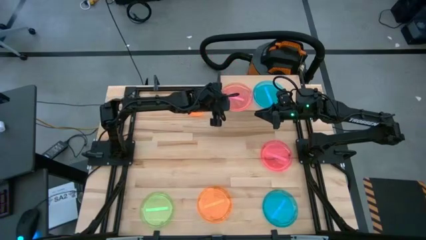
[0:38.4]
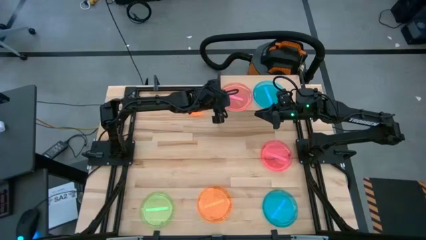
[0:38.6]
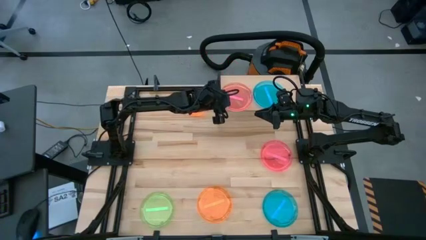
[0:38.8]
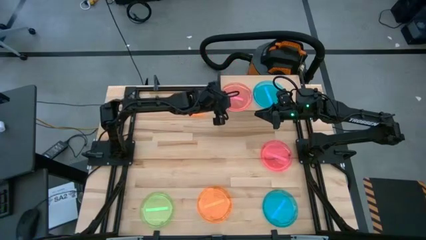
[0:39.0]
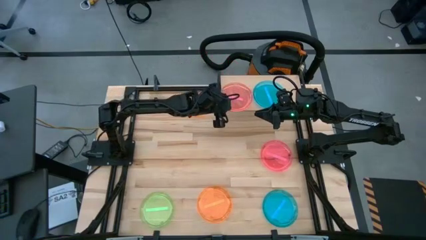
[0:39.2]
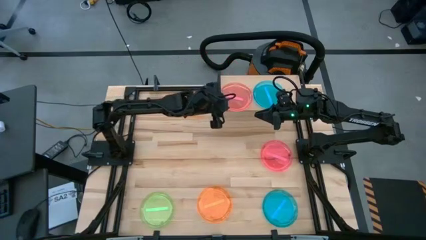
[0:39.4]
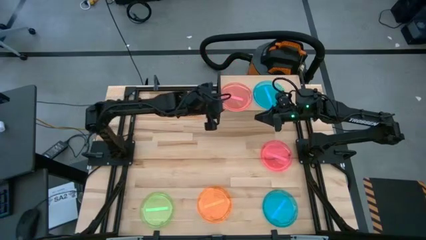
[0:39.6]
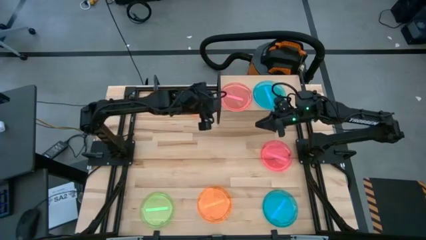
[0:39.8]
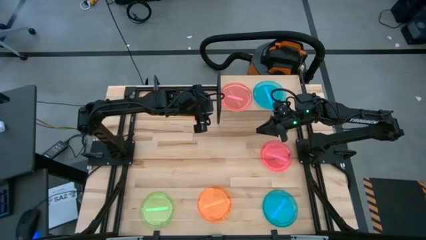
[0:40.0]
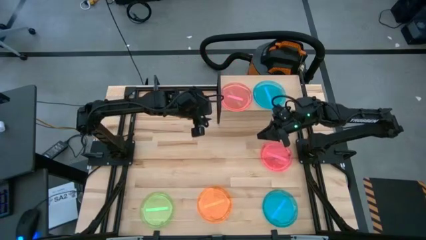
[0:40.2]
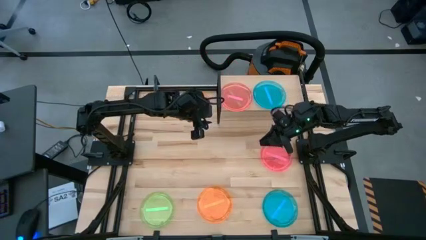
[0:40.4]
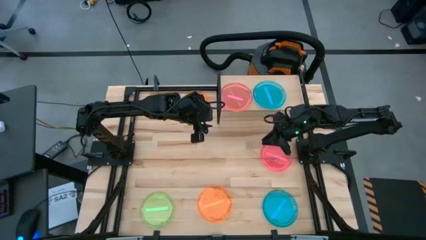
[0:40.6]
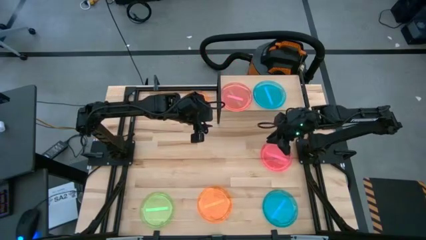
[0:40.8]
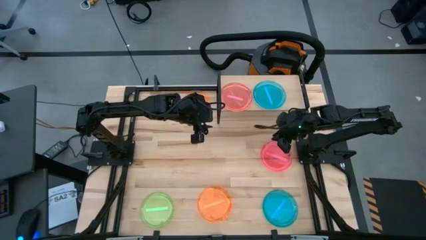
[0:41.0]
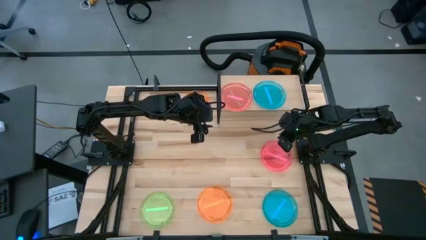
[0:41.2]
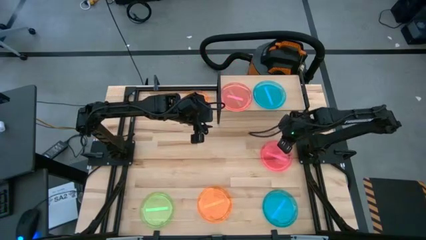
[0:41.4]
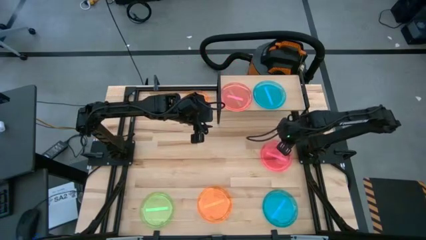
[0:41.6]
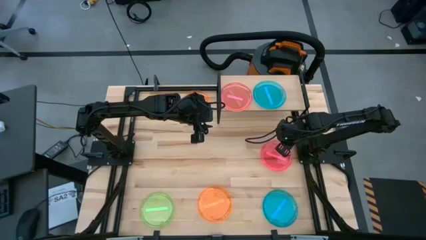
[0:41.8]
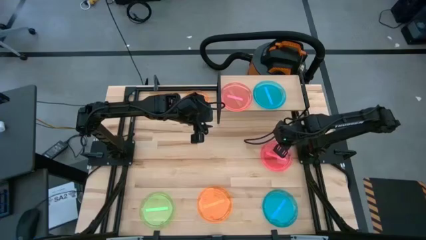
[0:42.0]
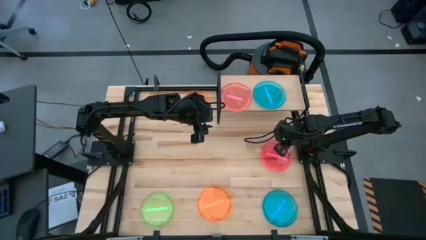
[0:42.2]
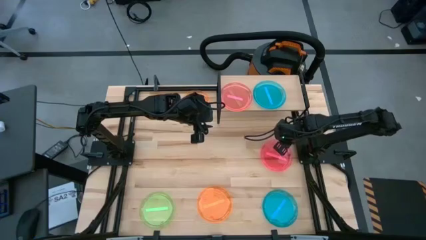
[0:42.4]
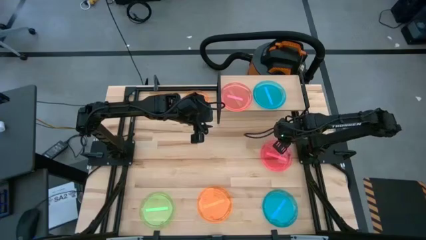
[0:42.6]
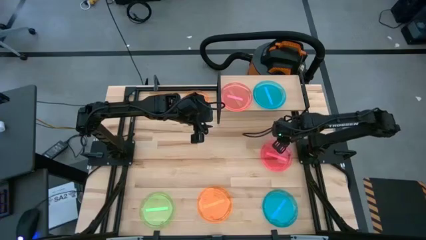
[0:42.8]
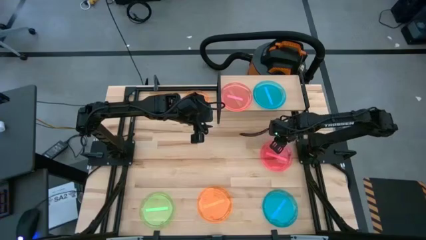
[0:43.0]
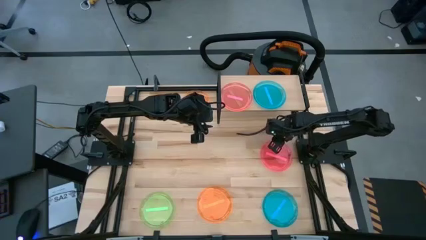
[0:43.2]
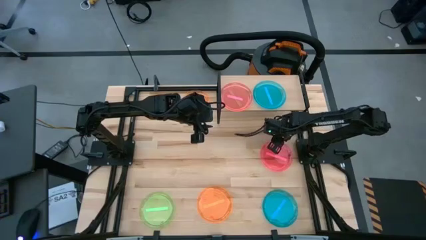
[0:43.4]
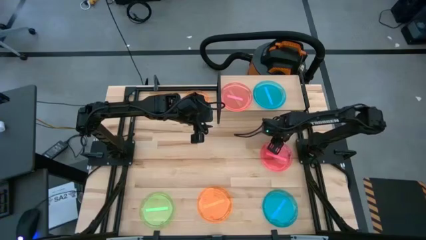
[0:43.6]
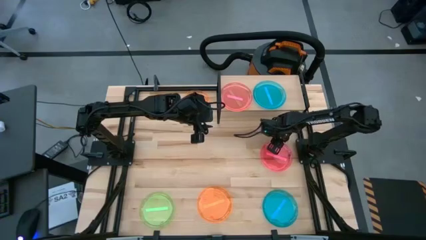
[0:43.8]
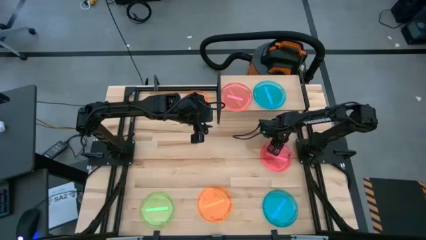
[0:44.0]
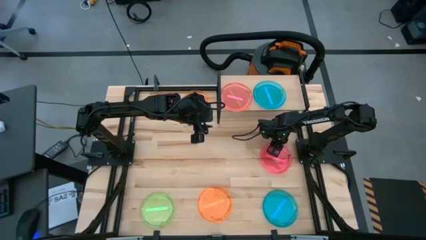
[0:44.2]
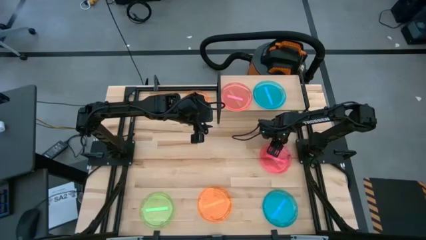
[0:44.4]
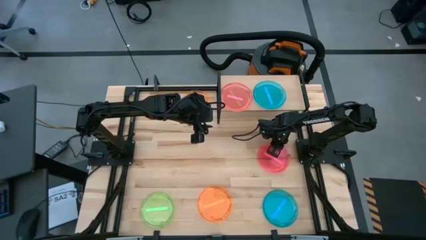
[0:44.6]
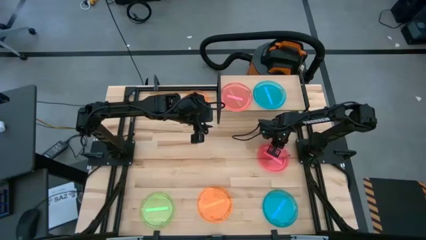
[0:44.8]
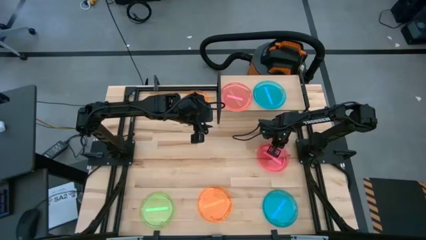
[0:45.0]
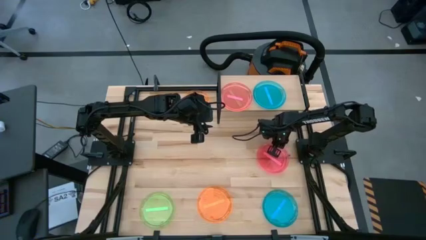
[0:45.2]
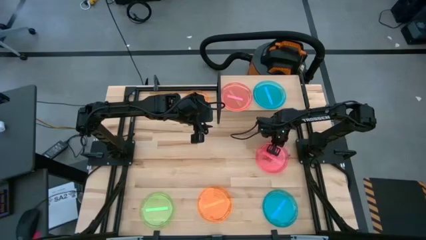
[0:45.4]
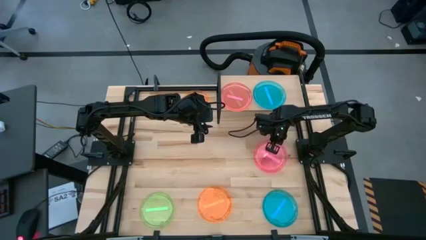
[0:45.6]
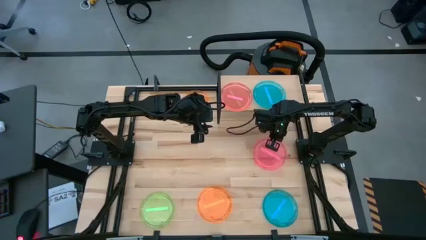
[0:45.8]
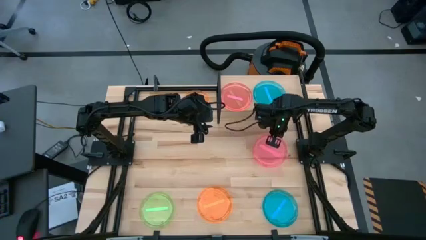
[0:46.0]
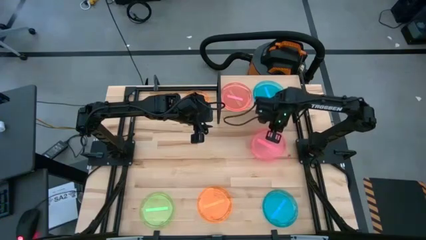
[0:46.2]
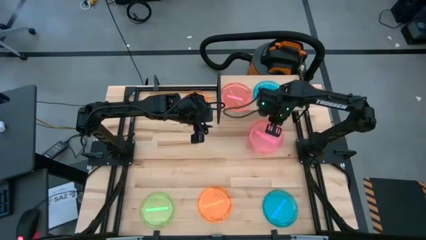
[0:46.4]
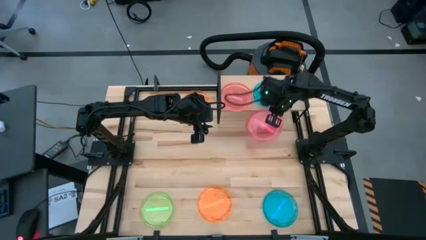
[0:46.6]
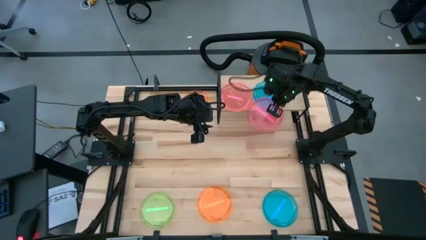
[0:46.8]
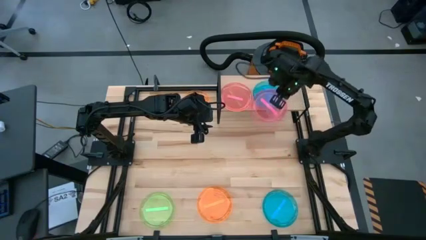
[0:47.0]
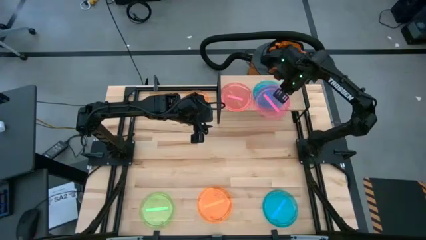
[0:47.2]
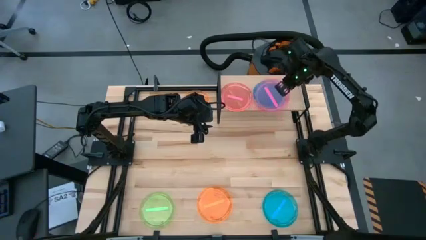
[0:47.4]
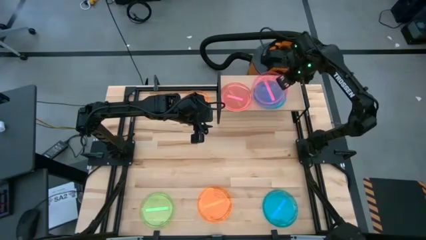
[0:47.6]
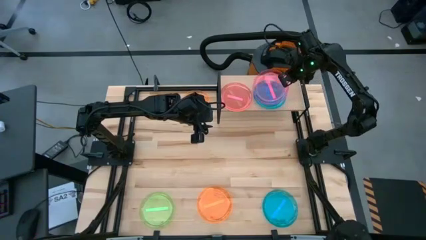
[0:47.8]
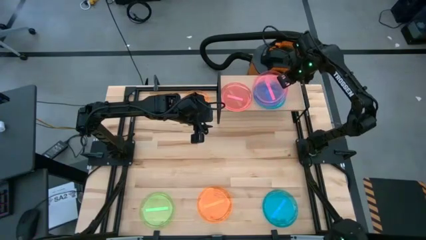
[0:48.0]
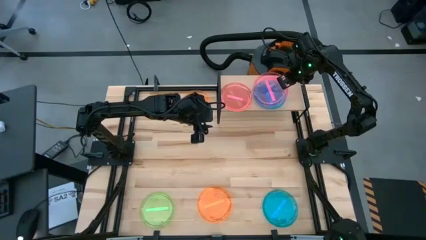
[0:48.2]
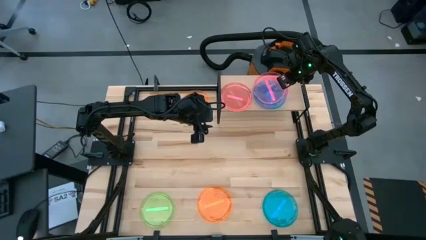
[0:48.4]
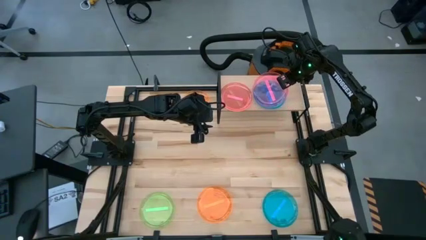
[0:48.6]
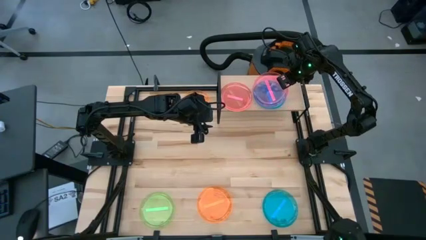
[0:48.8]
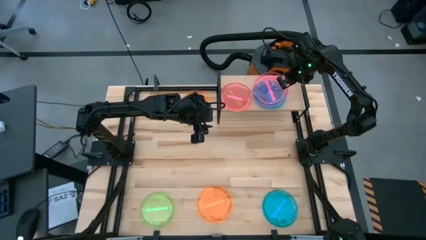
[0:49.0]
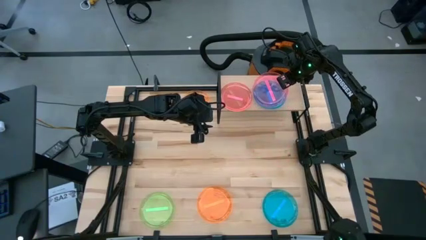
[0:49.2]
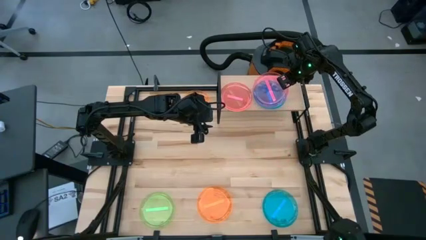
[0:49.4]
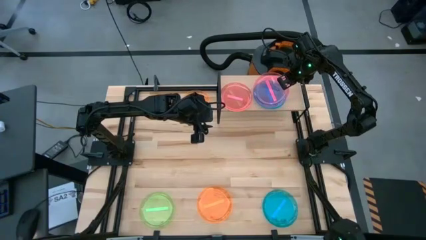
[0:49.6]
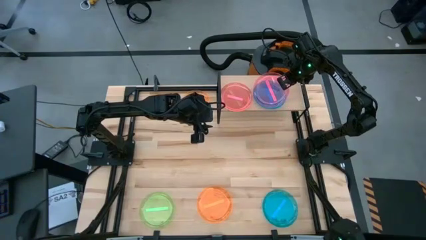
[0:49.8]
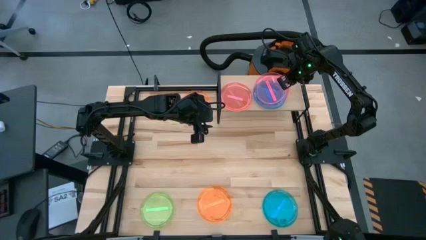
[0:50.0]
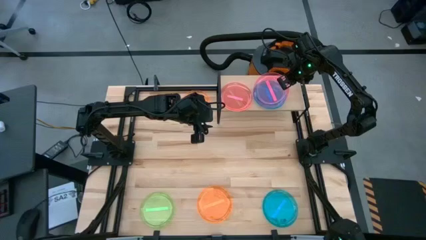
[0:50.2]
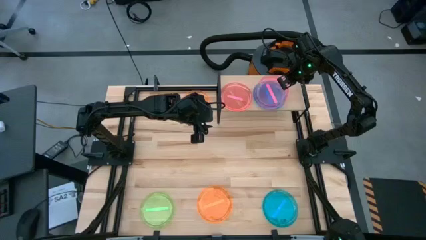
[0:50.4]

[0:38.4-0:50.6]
Task: Place and stack plates onto a shelf
Stack the pink plate on top of the blue plate on the shelf
